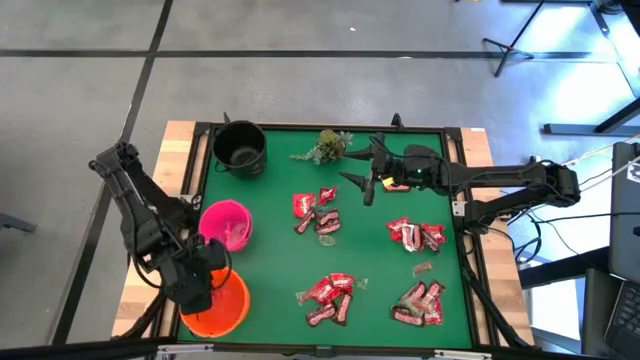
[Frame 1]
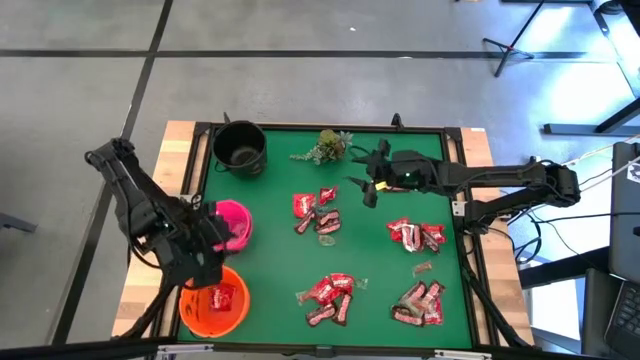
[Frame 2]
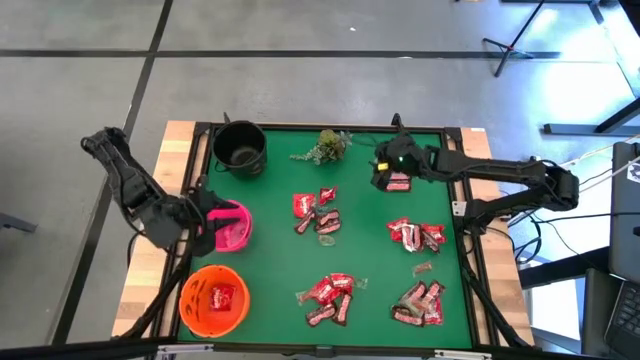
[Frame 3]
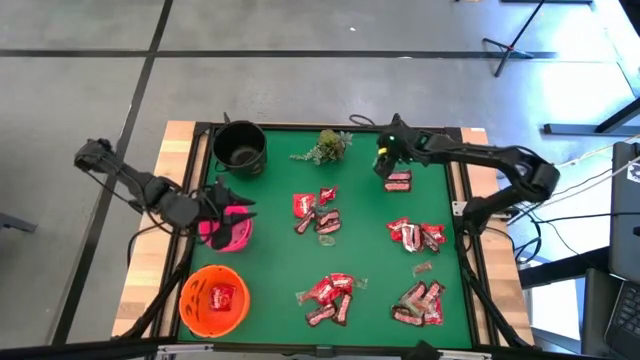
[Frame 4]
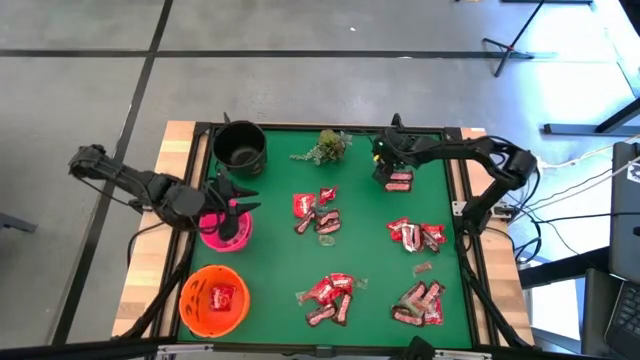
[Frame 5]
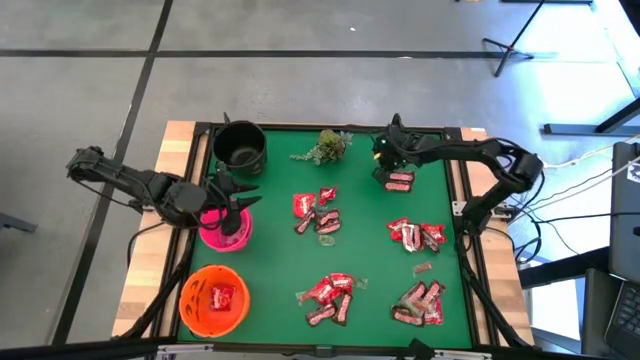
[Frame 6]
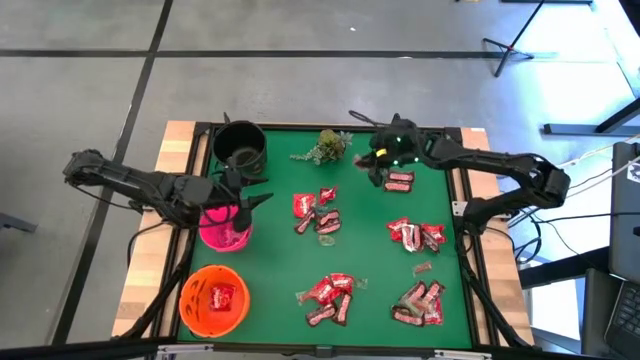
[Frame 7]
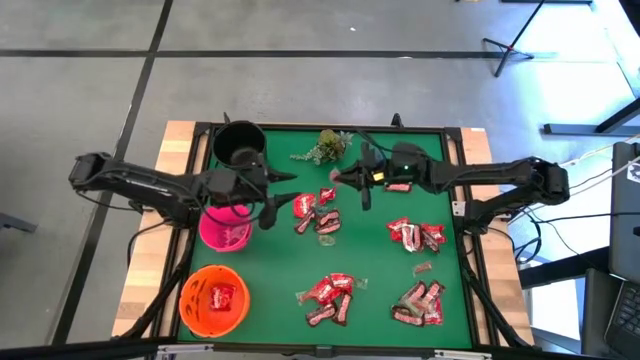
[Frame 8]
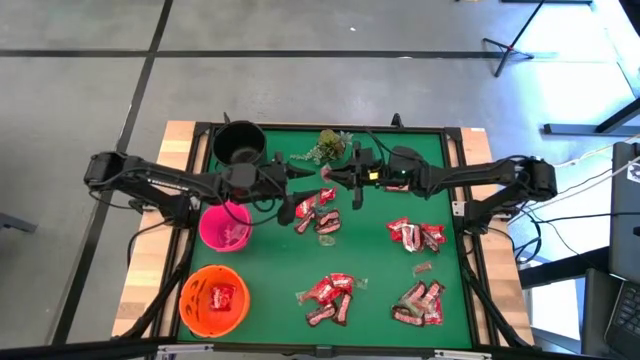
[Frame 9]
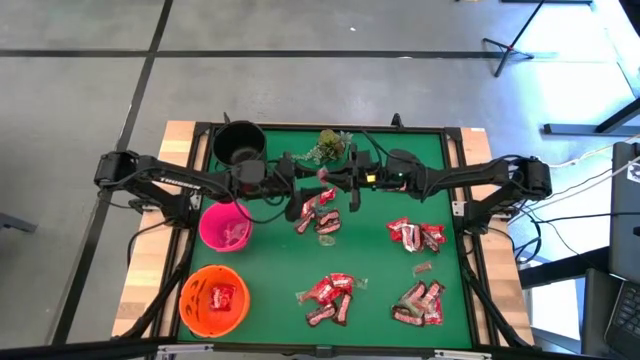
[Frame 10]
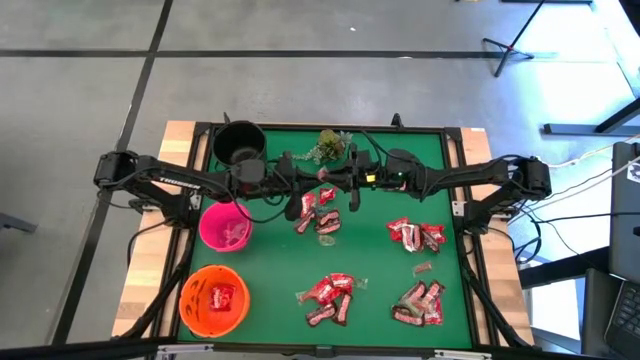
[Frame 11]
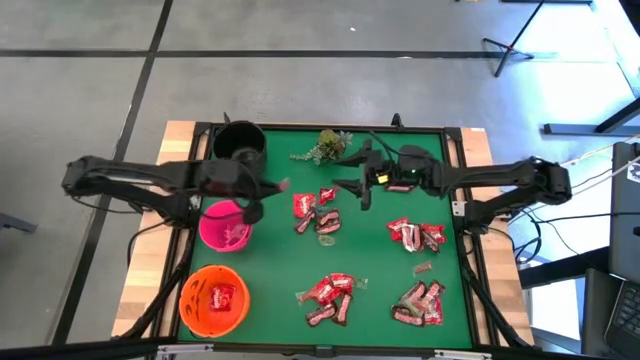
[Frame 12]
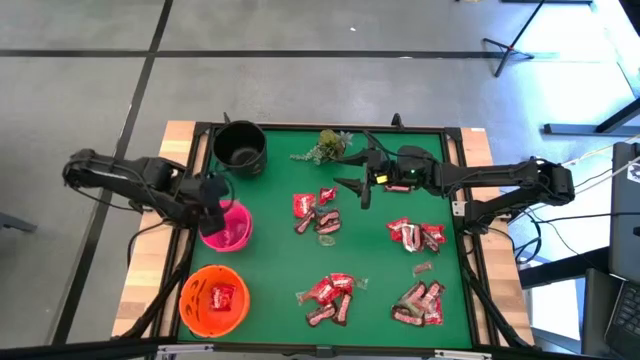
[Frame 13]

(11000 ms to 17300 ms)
Task: Sort candy
Put the red gummy into the pink bucket

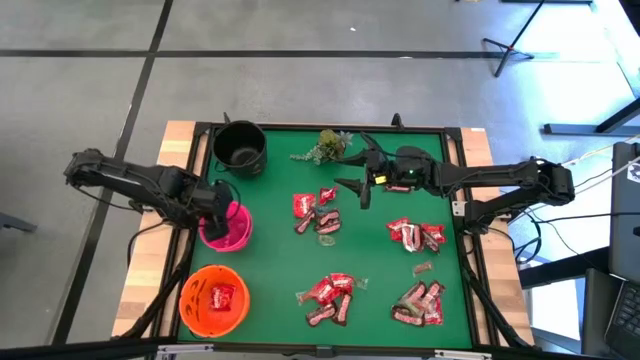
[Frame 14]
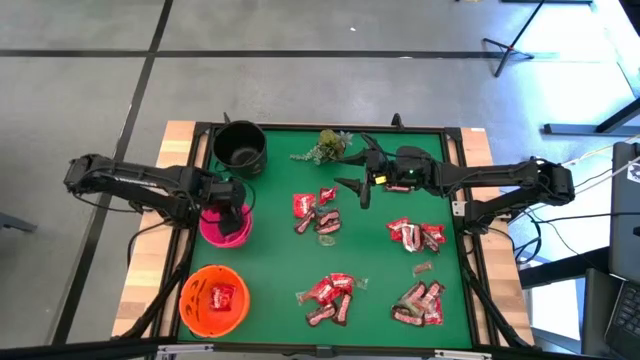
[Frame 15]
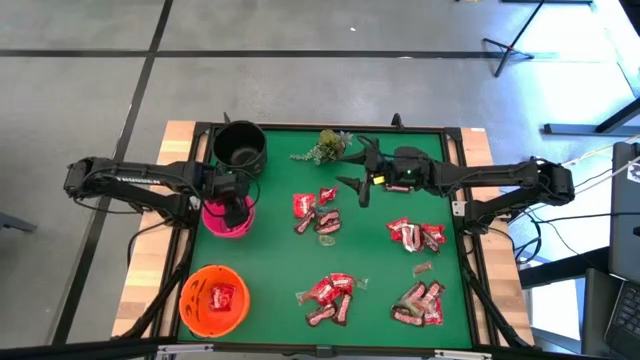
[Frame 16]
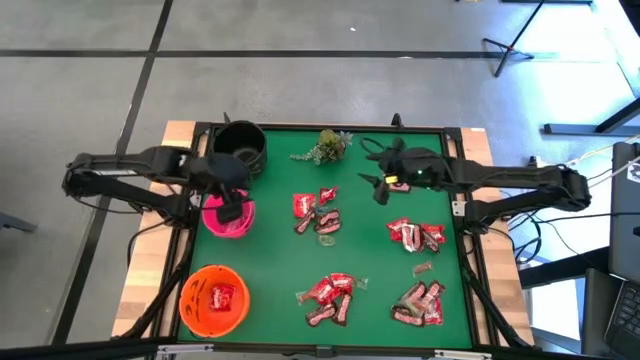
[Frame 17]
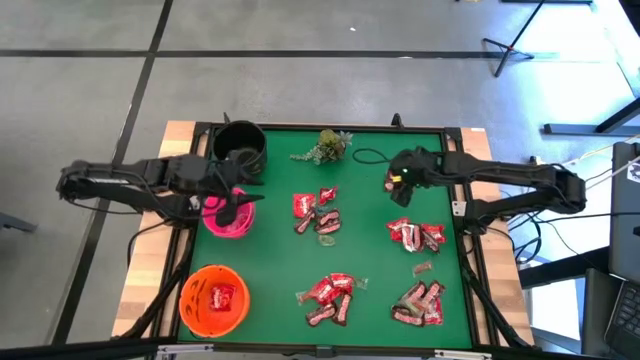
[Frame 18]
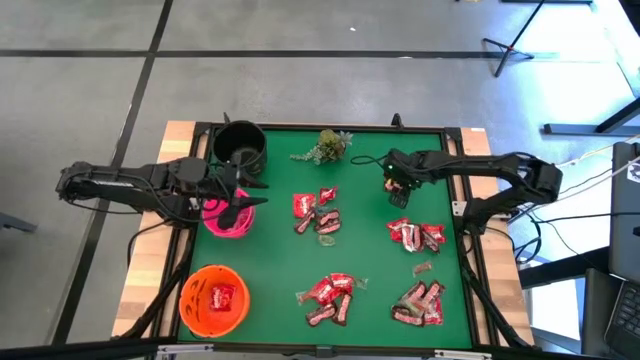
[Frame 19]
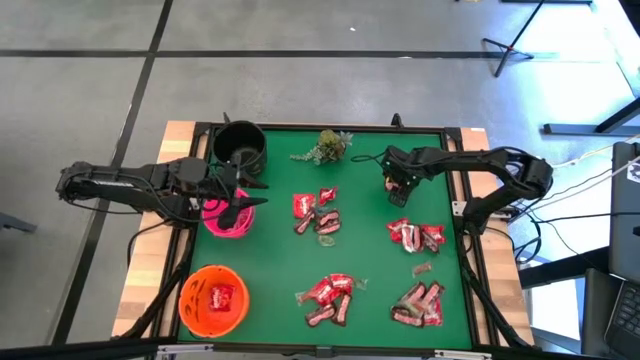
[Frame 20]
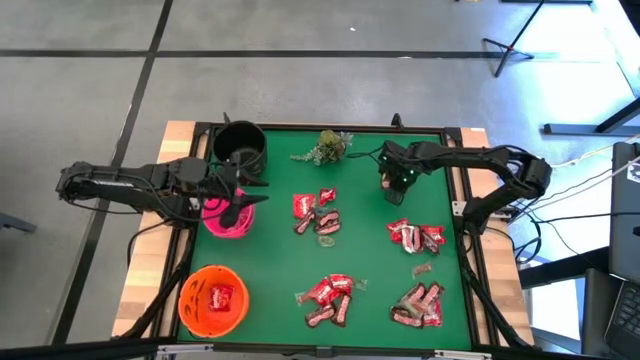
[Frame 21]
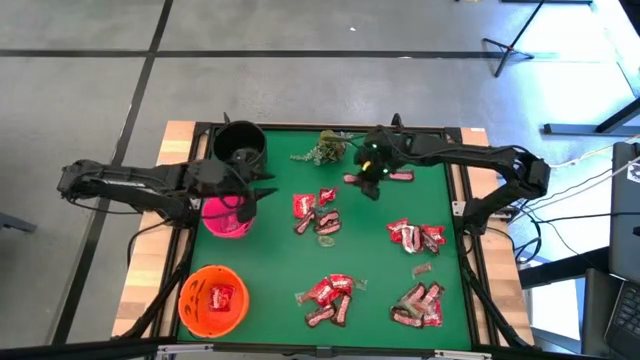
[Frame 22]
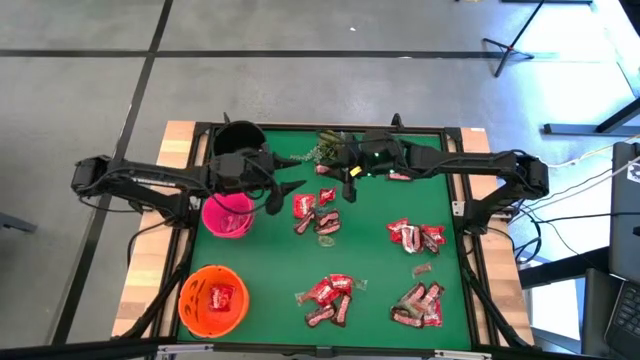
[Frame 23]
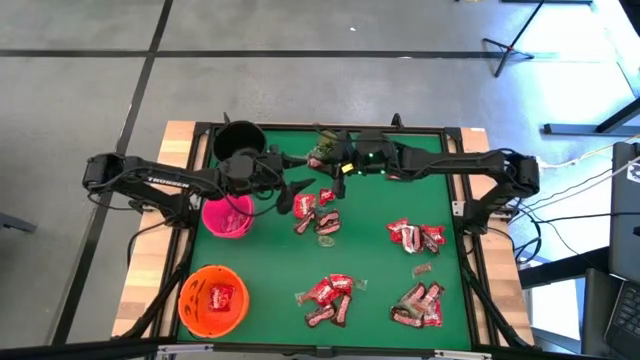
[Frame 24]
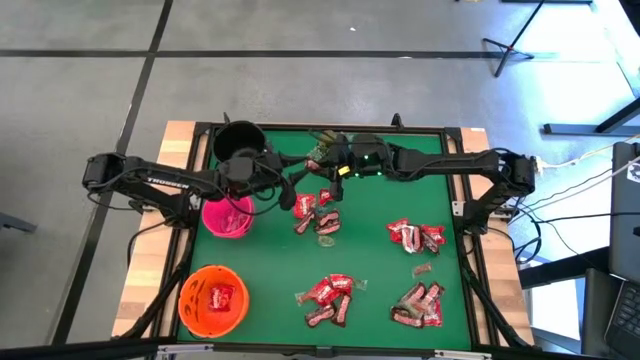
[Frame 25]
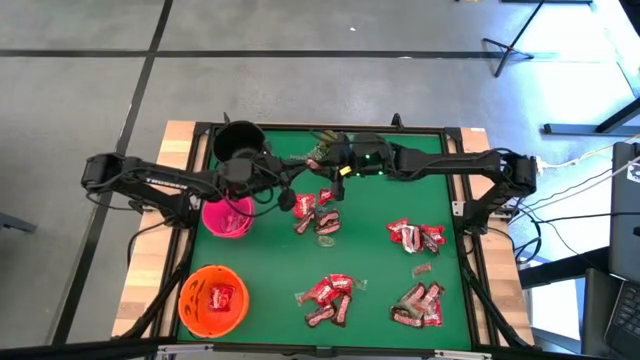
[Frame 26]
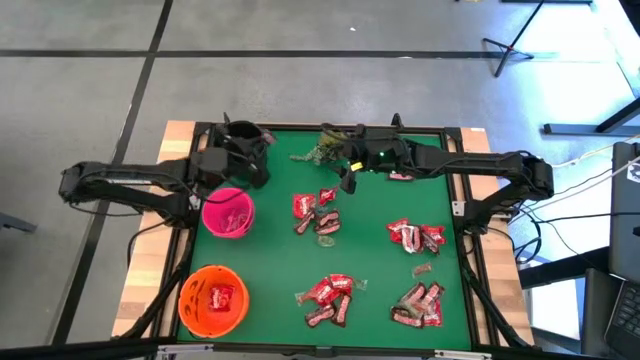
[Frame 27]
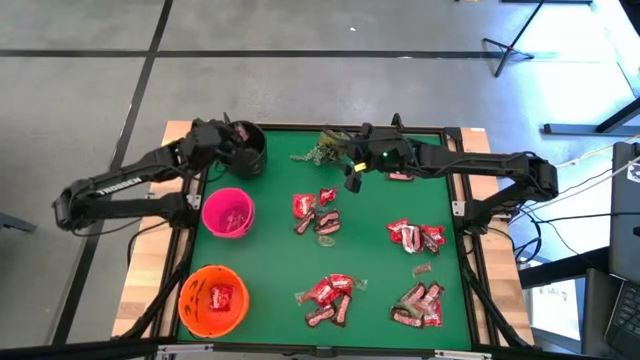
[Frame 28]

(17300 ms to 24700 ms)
Put the brown chocolate into the black bucket

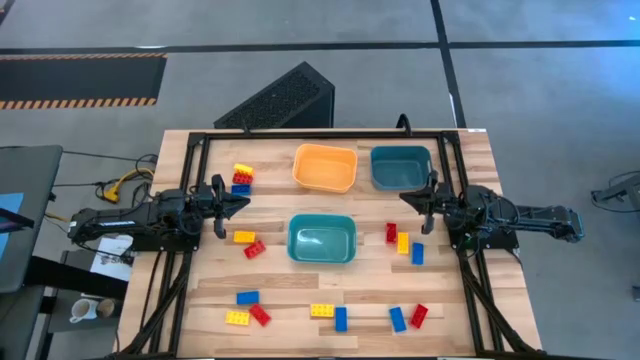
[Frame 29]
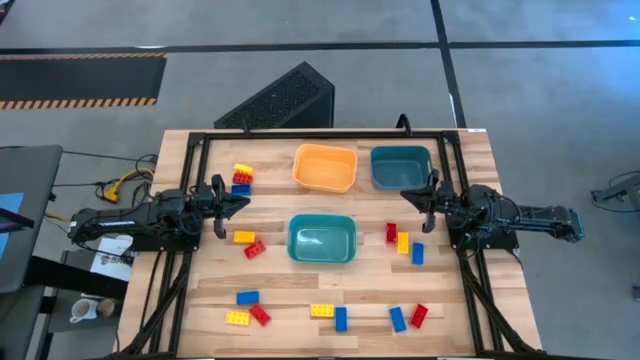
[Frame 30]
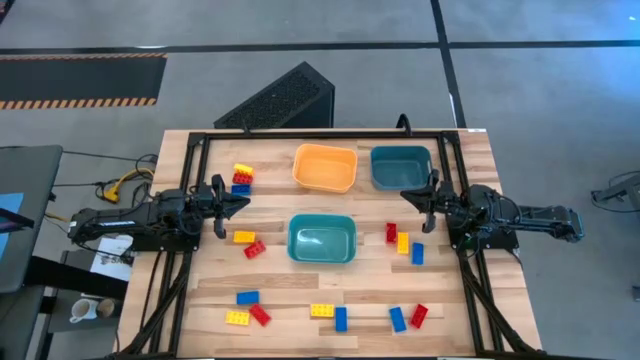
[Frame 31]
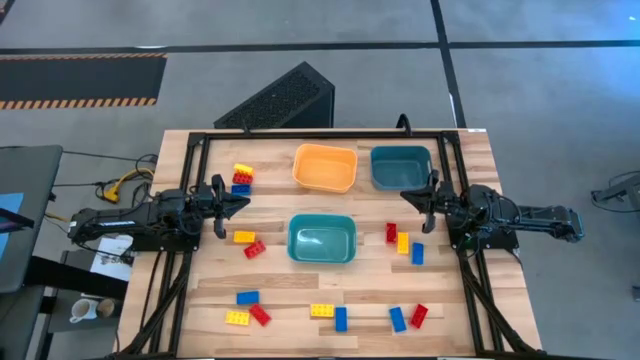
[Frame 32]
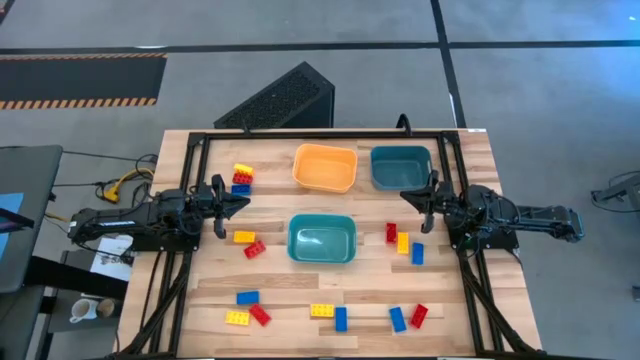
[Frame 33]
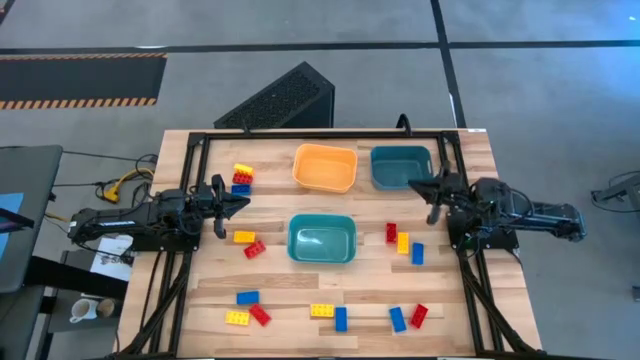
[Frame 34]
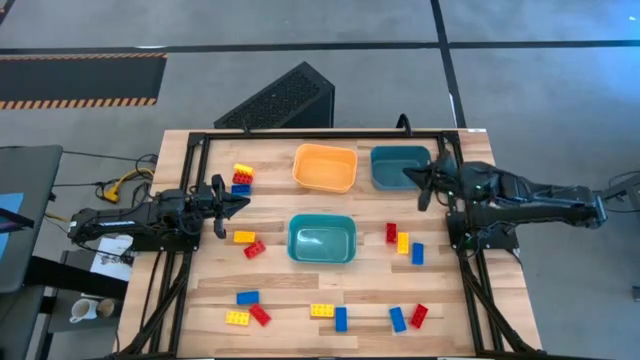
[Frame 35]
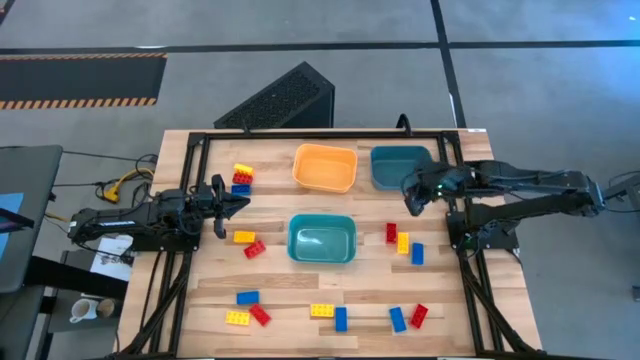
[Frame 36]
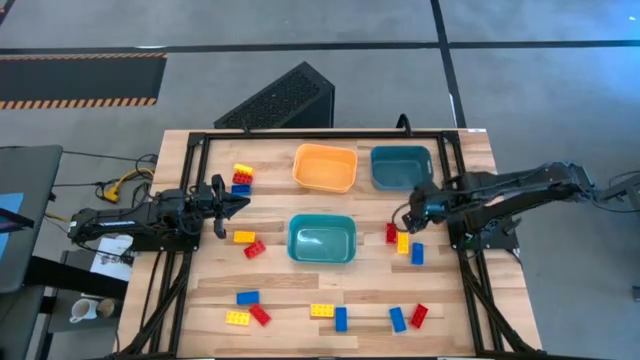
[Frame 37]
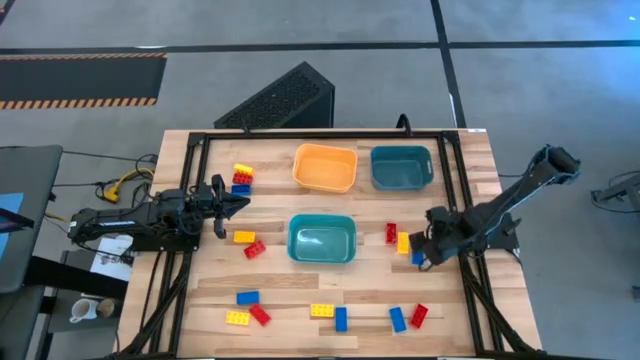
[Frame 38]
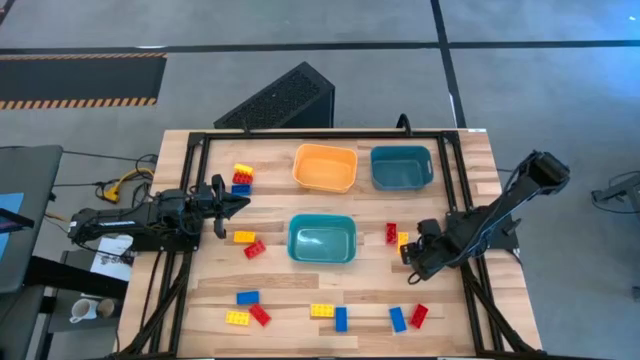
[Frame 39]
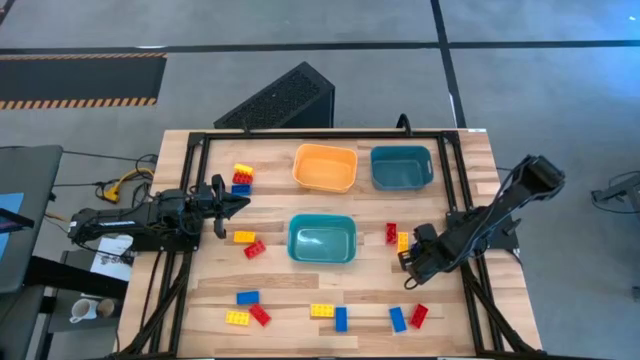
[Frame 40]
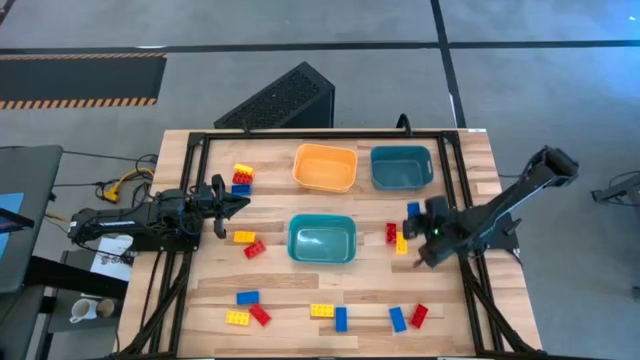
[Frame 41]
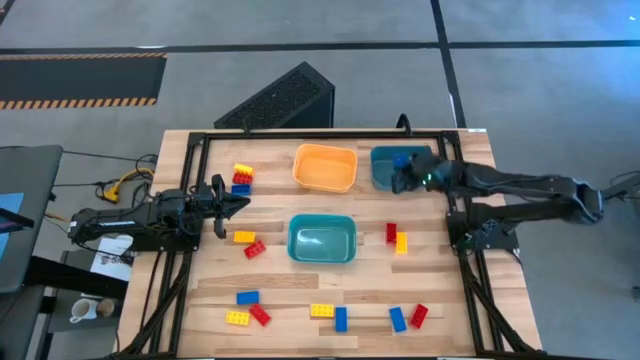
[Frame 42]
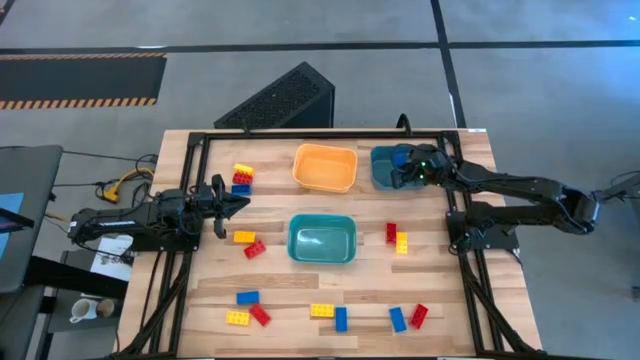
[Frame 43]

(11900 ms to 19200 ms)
Task: Sort & place blocks by color
Put the blue game piece into the blue bin
